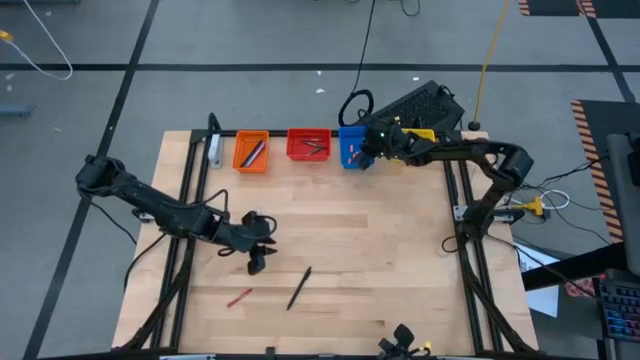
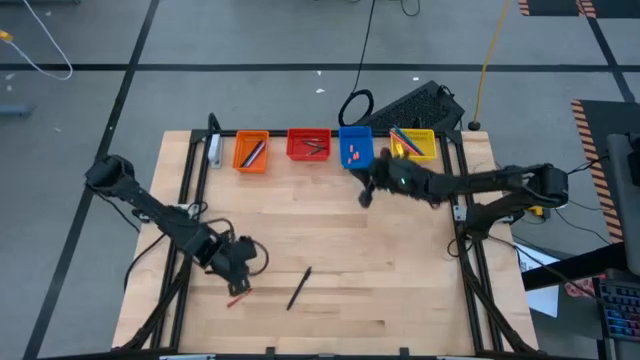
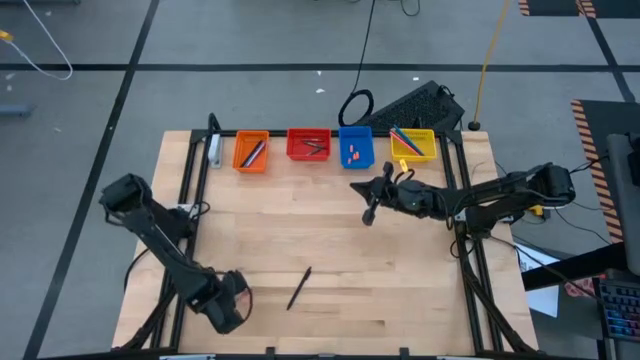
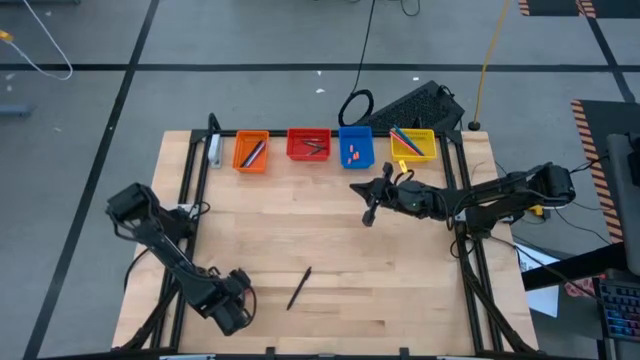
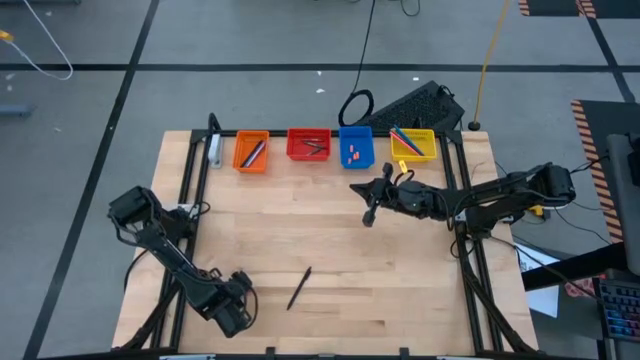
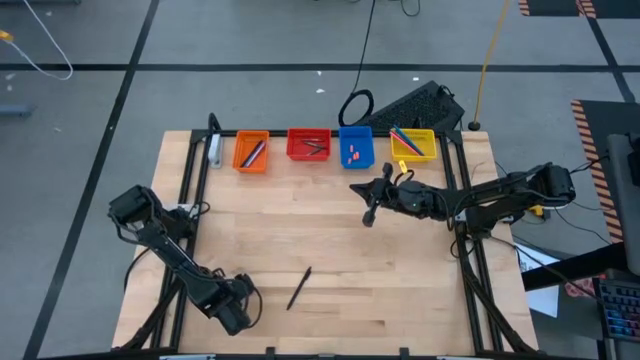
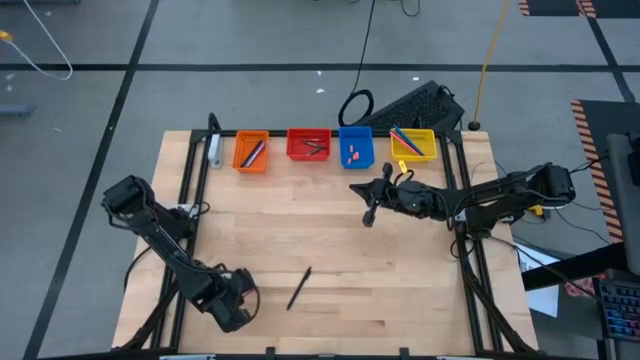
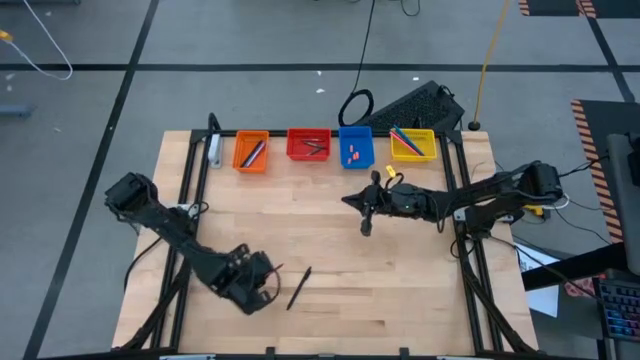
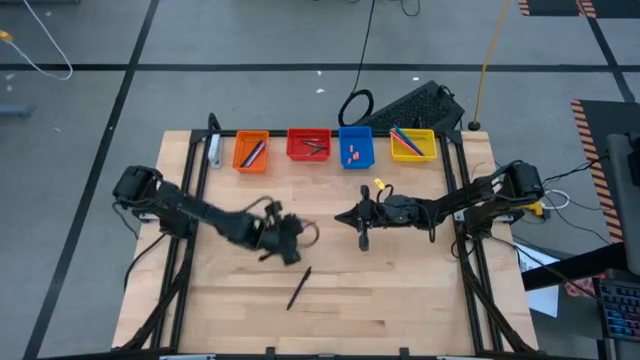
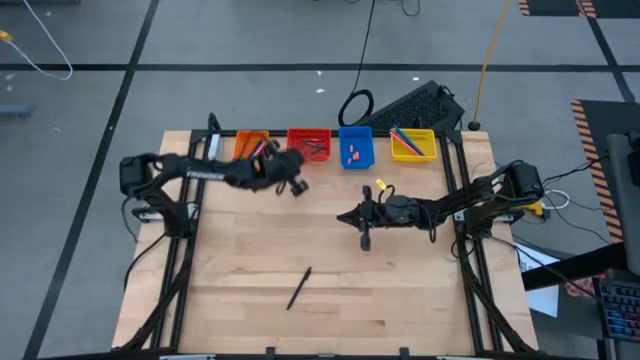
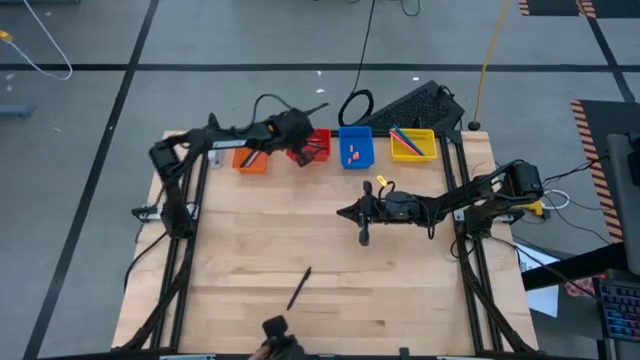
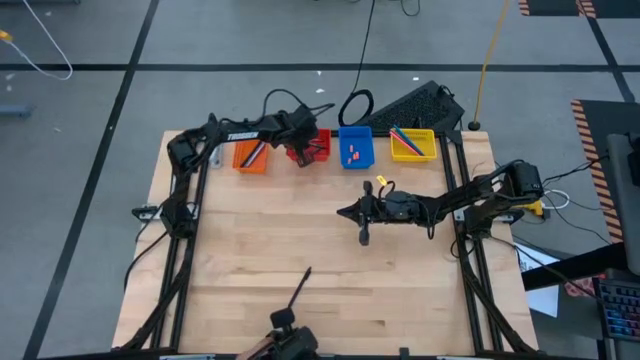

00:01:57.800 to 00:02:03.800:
Task: Sort crayons/erasers/pens/pencils in bins
Put the red crayon into the red basket

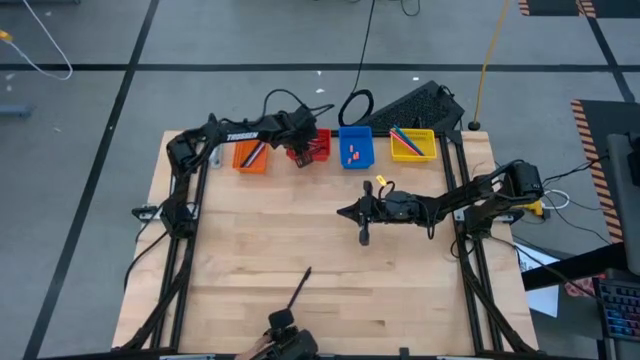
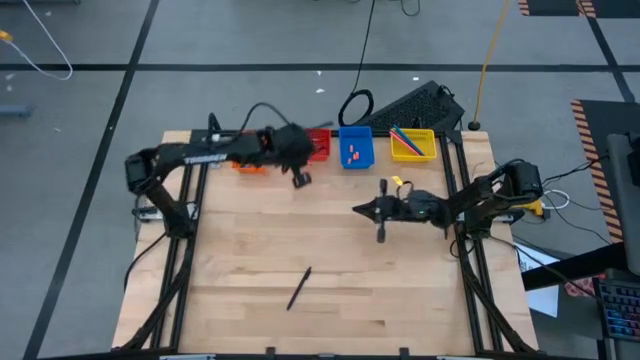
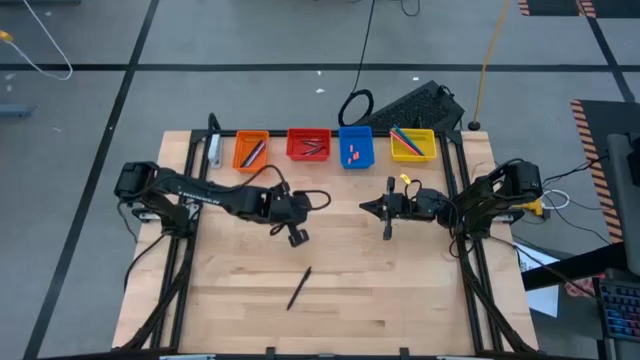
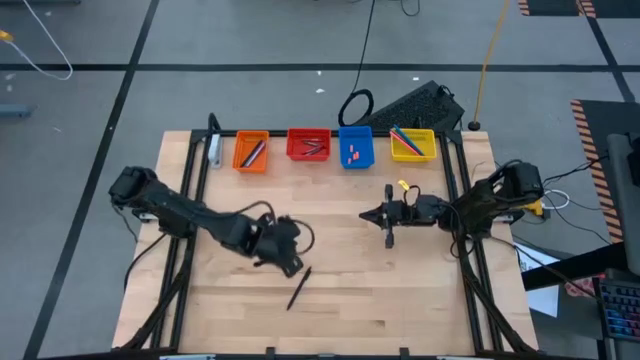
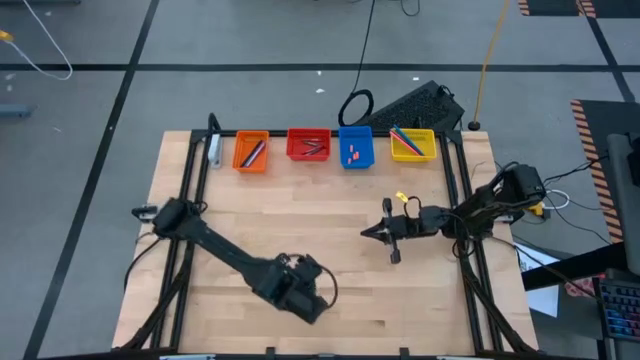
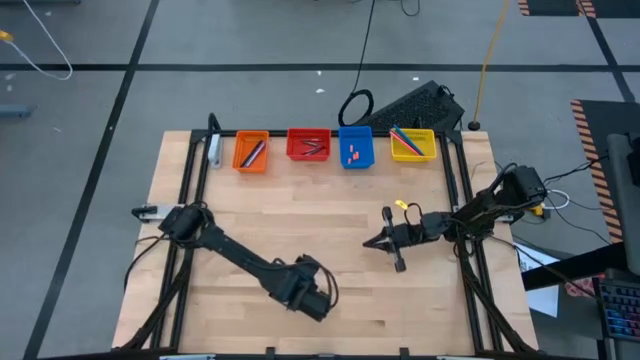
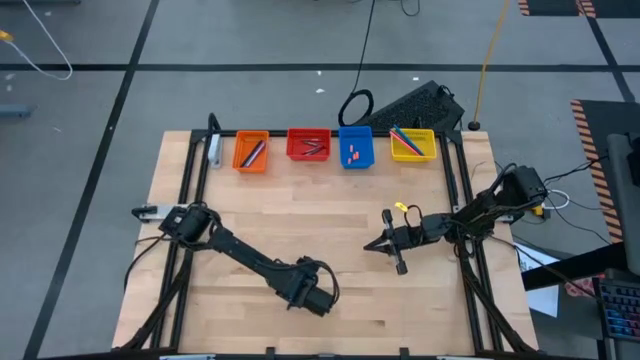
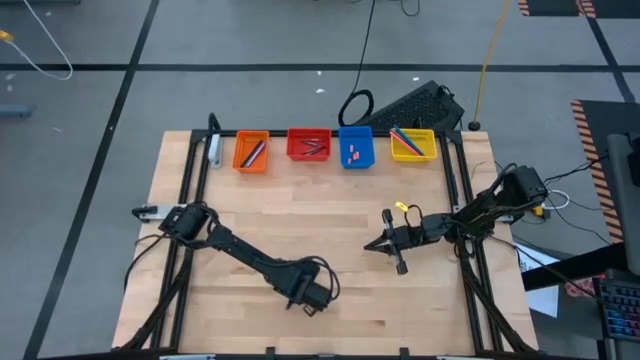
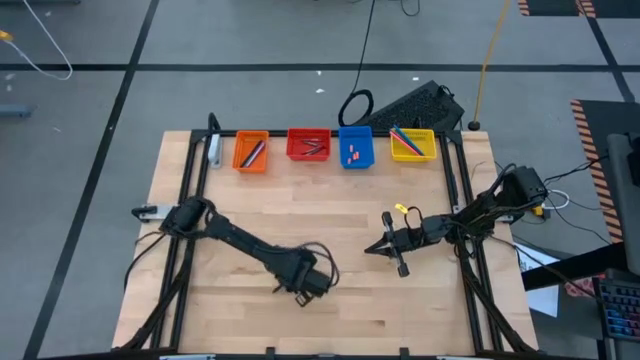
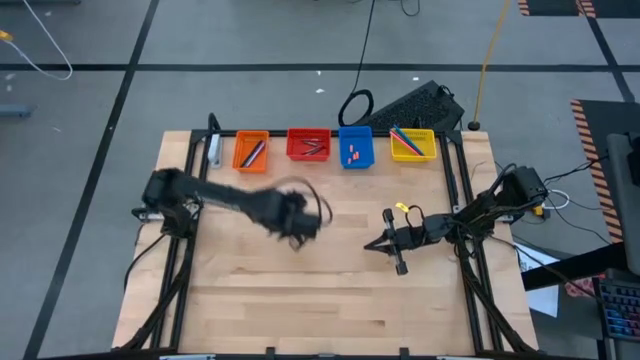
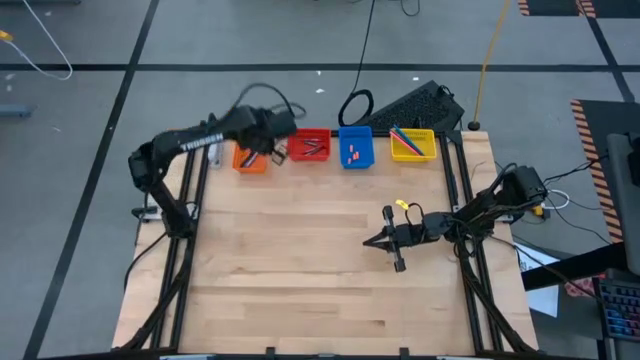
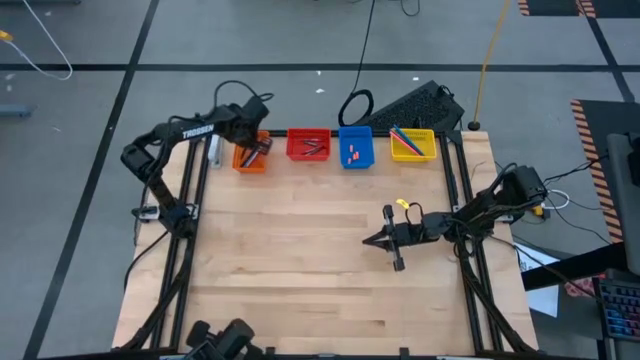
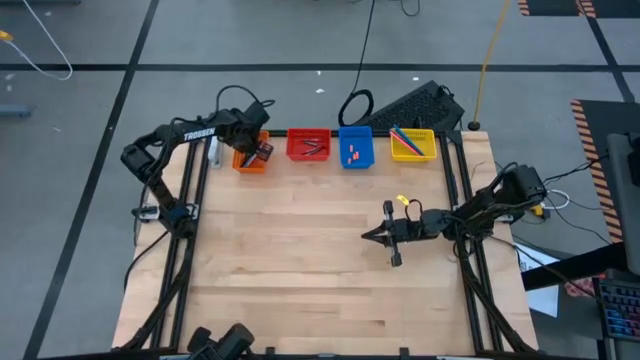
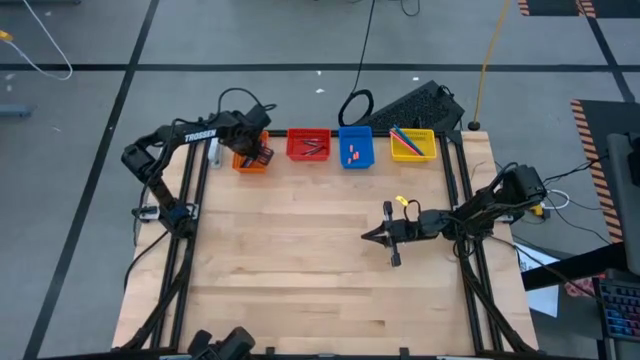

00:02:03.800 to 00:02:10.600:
Put the black pen into the orange basket

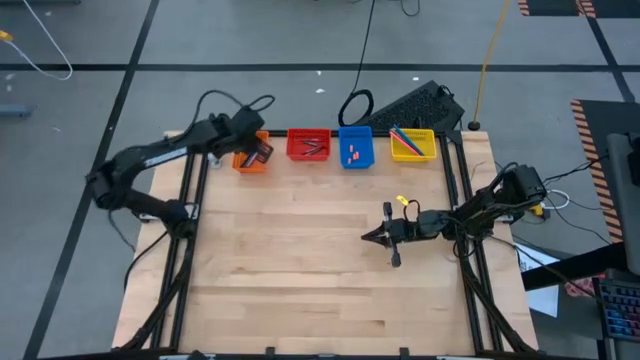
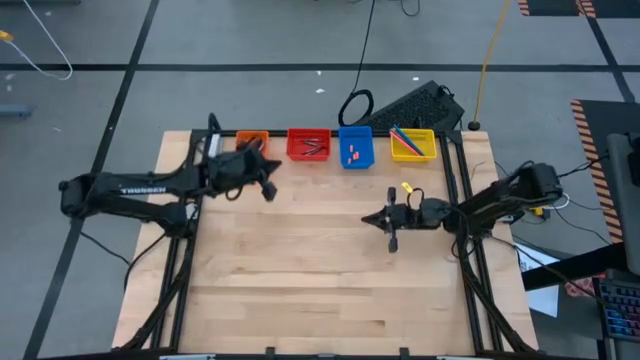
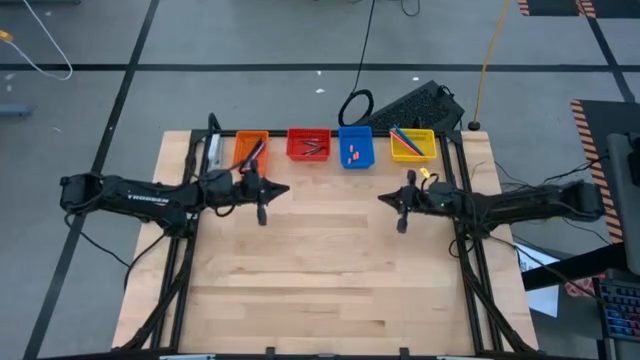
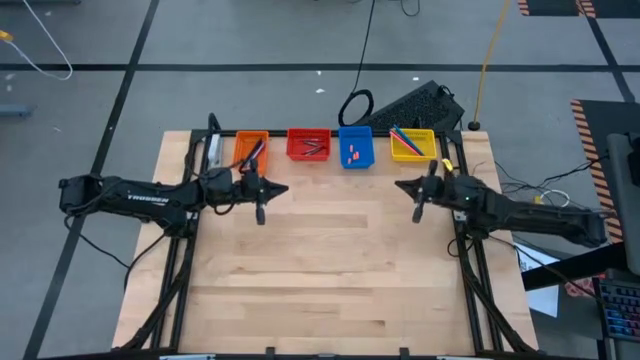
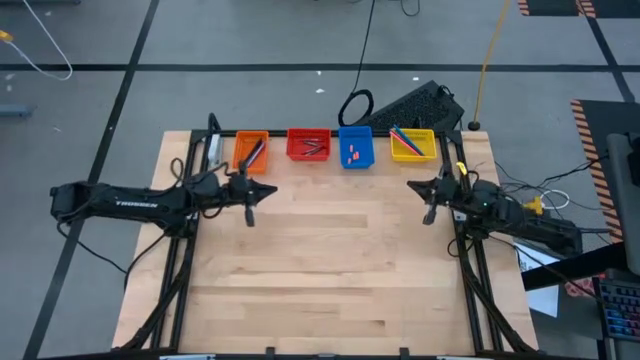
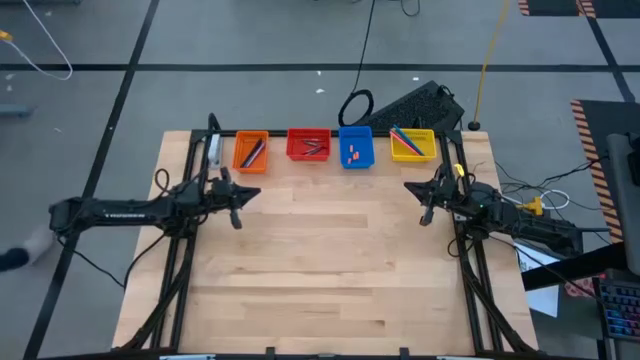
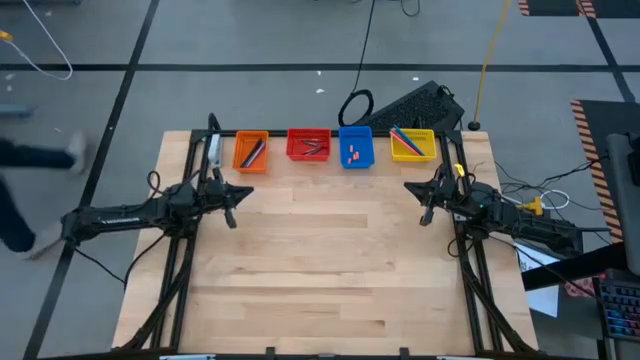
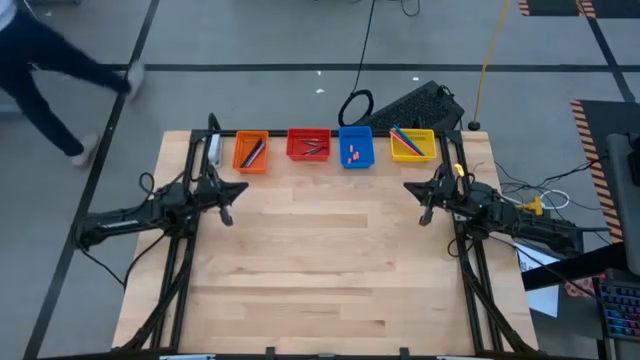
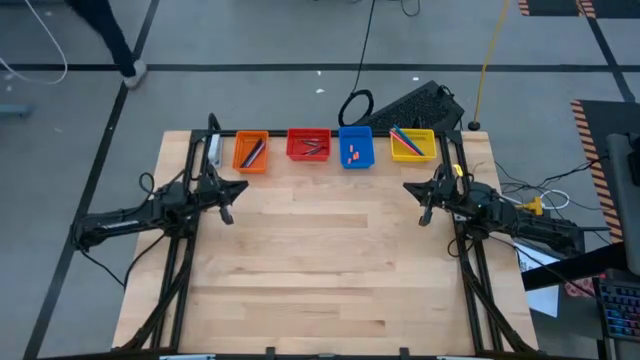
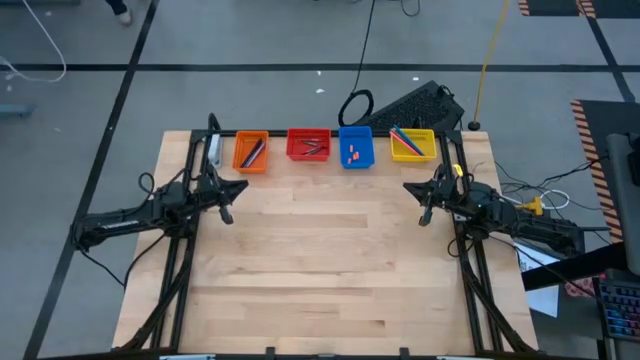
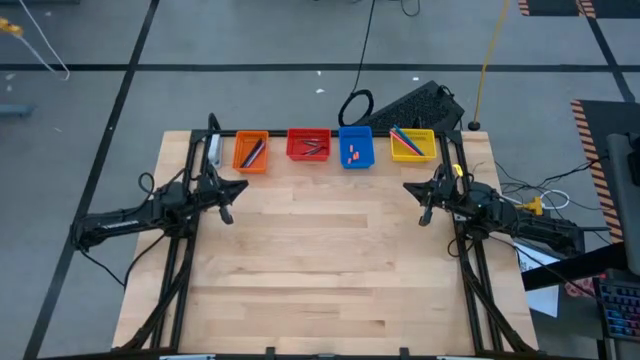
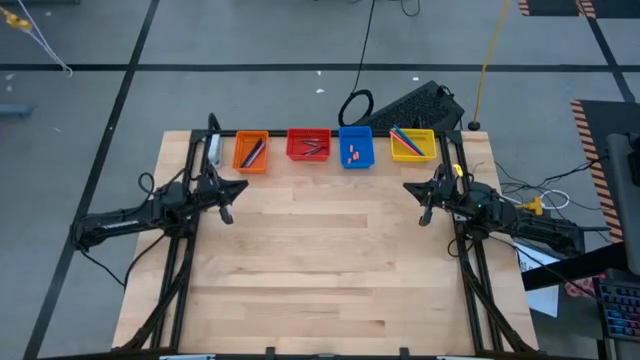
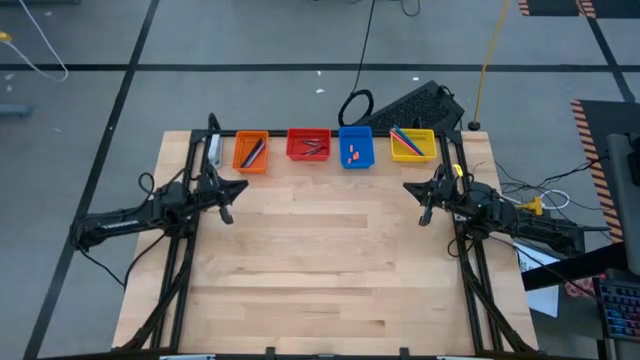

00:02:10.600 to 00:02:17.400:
Return to Home Position

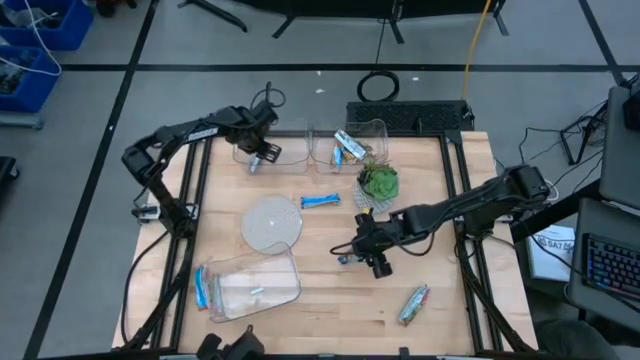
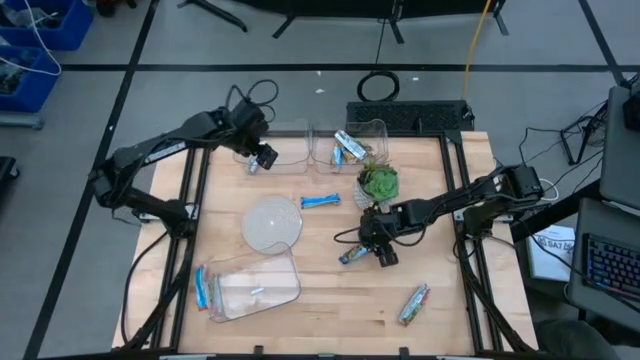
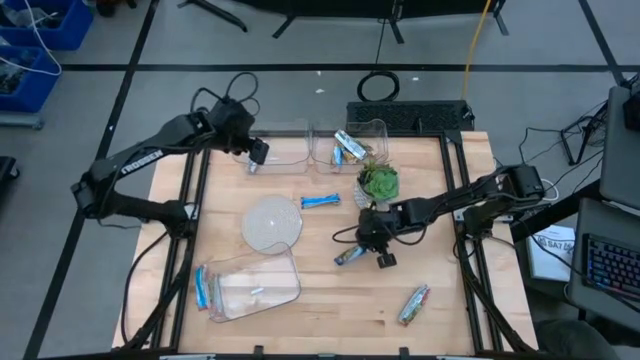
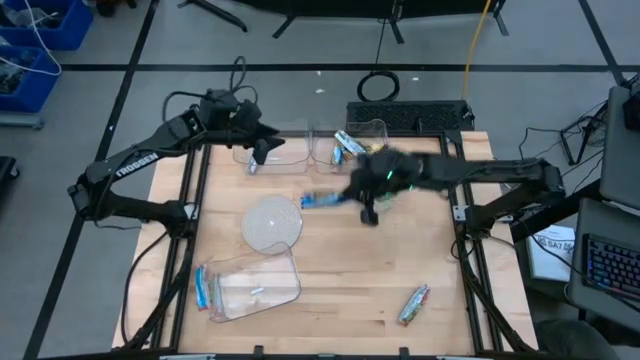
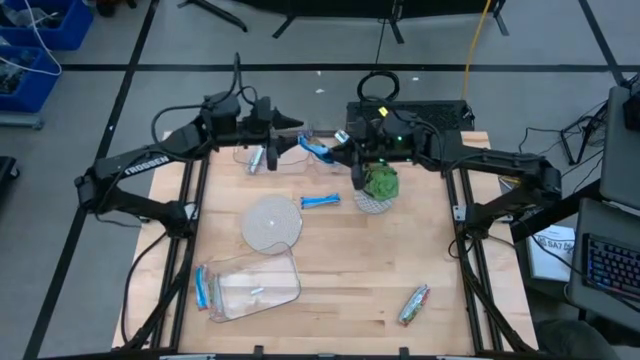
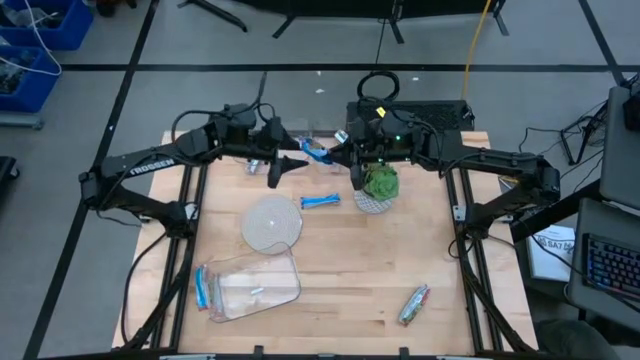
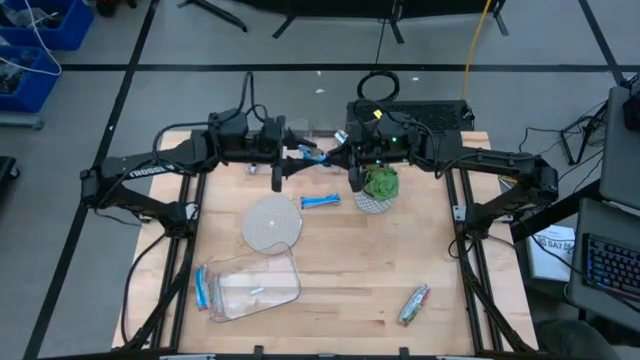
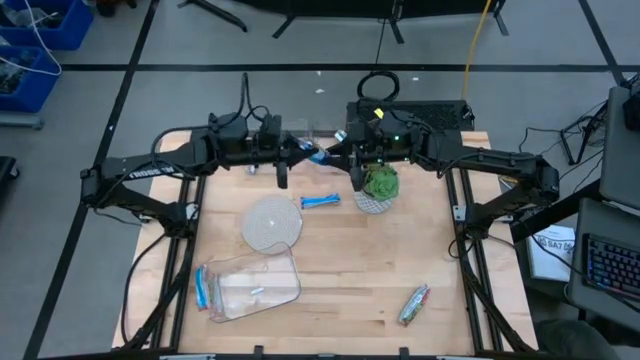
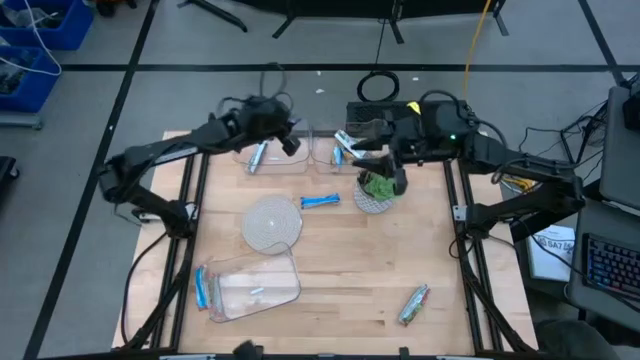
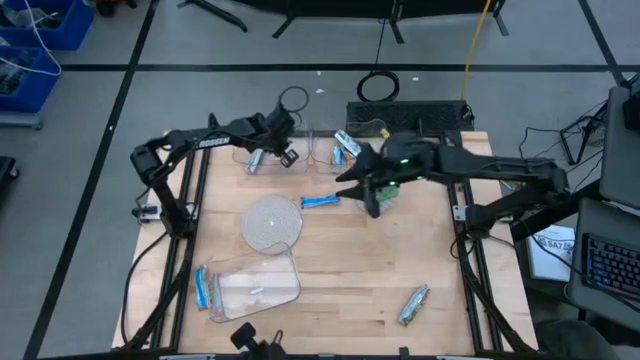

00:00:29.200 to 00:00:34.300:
Task: Pick and place Granola Bars by type
Put the blue granola bar into the top left transparent bin
